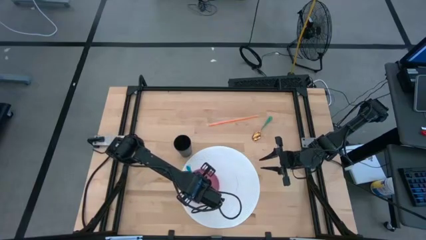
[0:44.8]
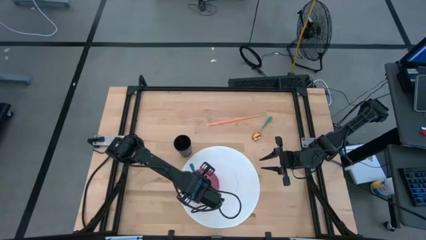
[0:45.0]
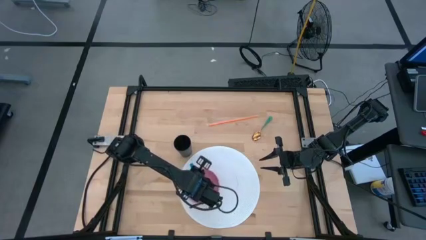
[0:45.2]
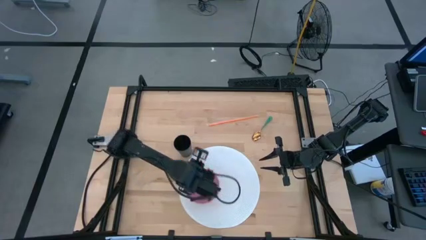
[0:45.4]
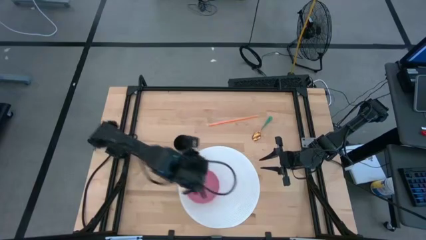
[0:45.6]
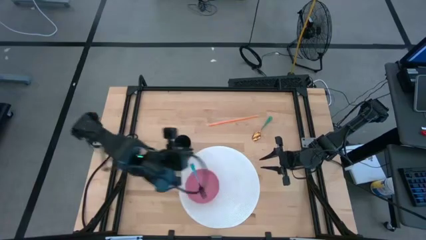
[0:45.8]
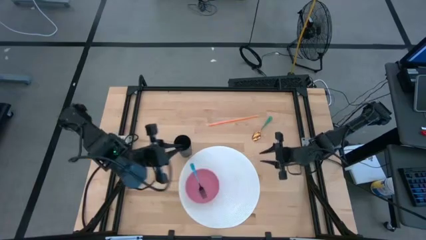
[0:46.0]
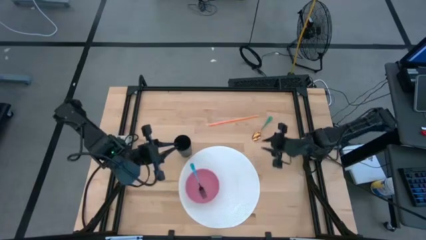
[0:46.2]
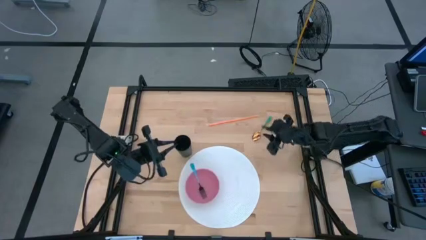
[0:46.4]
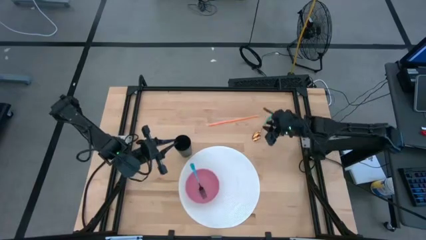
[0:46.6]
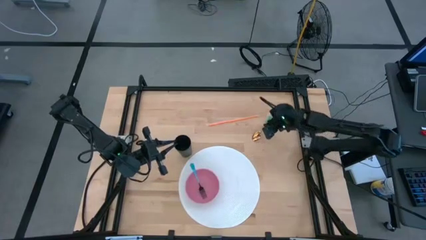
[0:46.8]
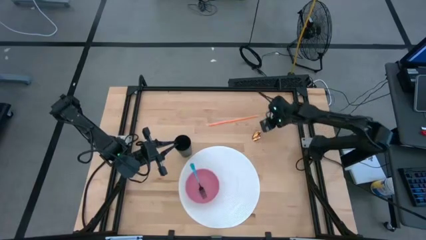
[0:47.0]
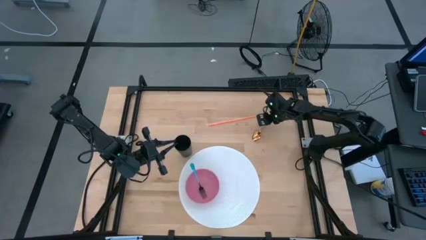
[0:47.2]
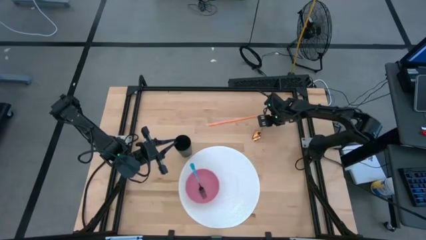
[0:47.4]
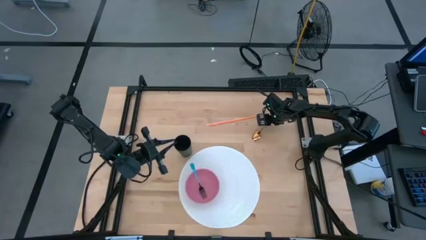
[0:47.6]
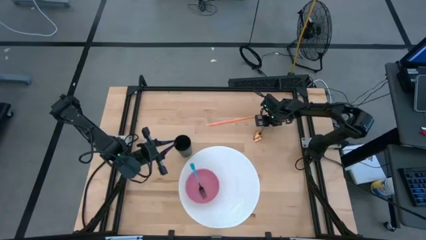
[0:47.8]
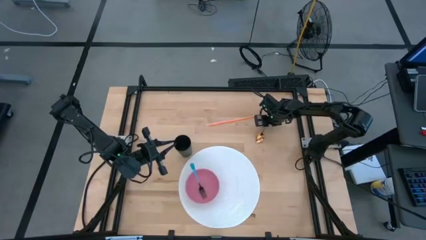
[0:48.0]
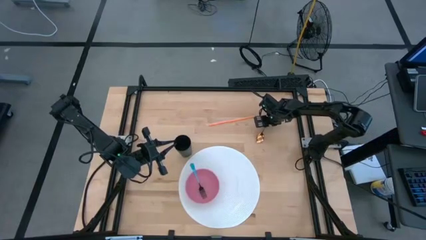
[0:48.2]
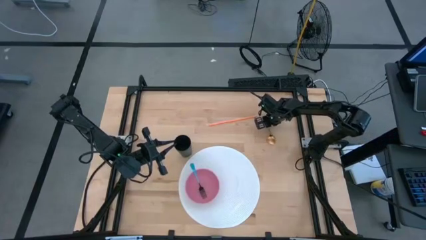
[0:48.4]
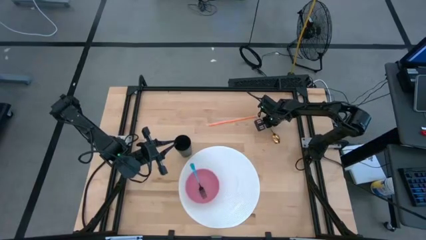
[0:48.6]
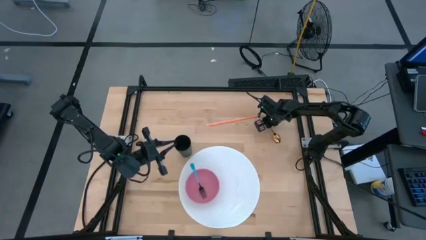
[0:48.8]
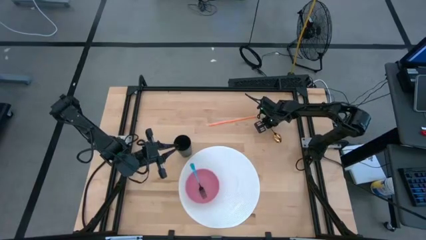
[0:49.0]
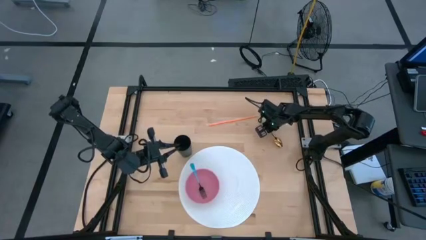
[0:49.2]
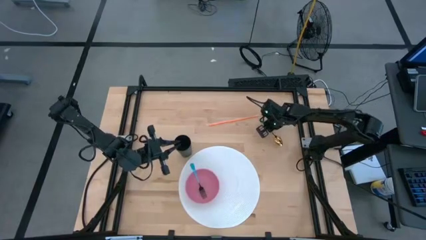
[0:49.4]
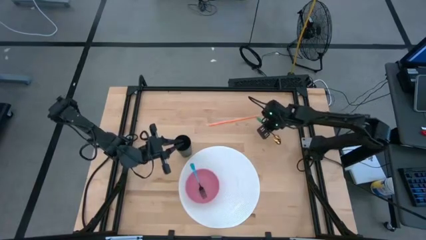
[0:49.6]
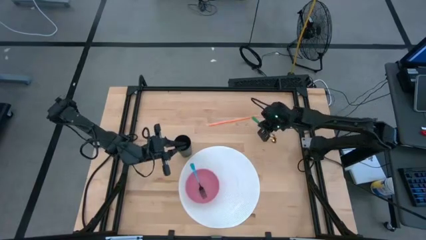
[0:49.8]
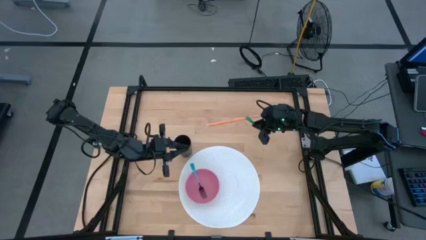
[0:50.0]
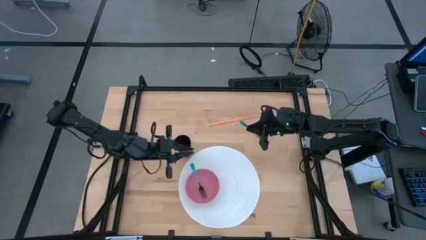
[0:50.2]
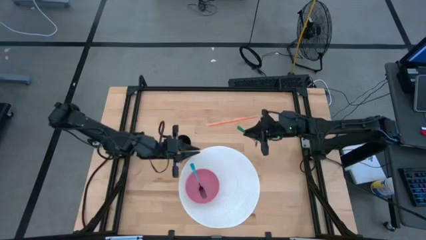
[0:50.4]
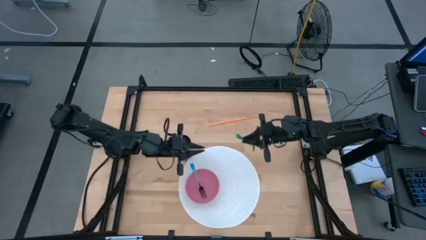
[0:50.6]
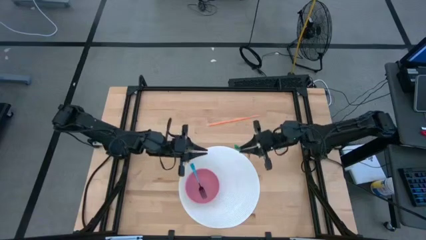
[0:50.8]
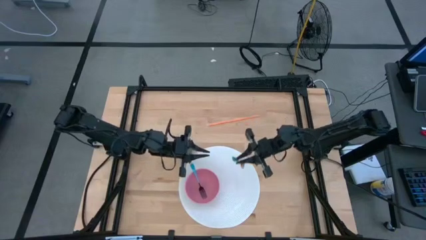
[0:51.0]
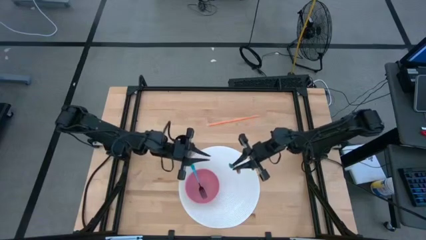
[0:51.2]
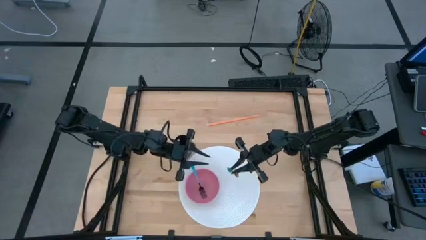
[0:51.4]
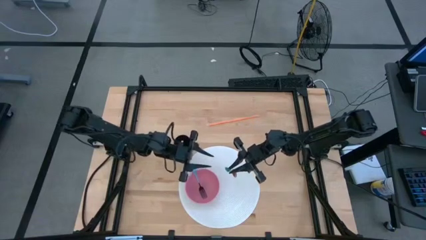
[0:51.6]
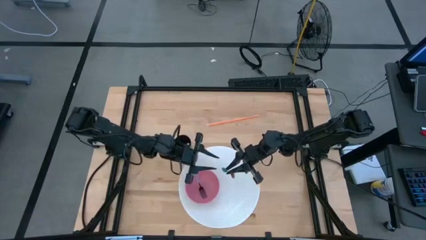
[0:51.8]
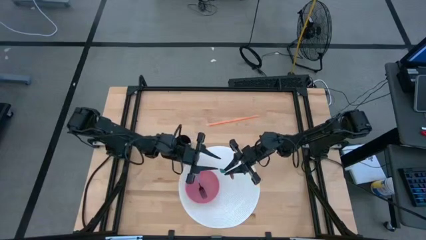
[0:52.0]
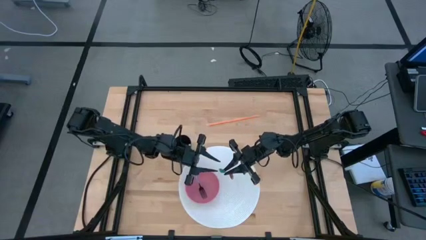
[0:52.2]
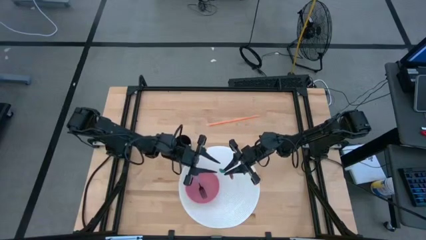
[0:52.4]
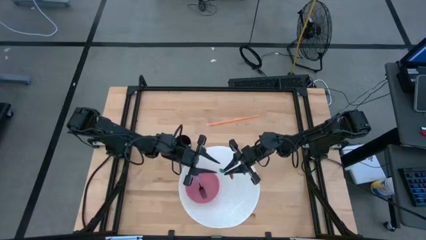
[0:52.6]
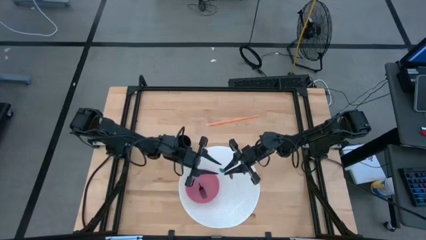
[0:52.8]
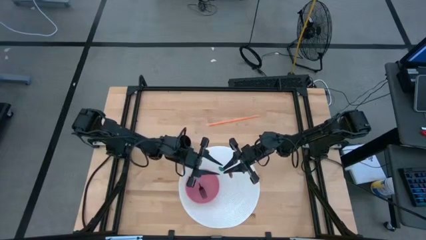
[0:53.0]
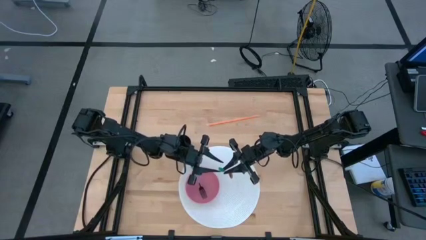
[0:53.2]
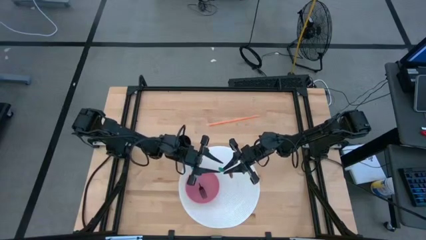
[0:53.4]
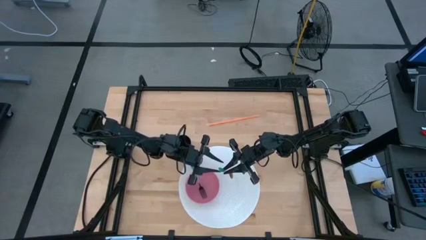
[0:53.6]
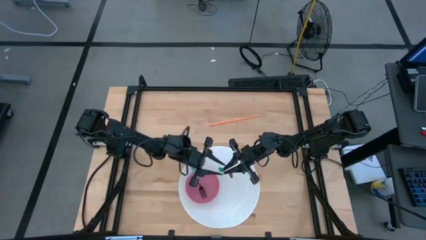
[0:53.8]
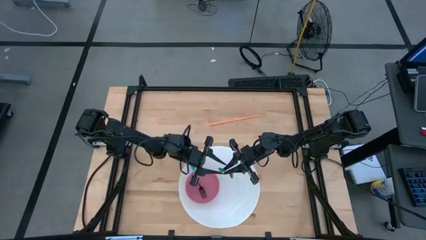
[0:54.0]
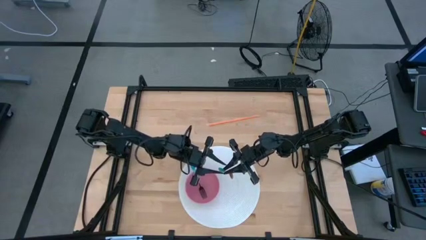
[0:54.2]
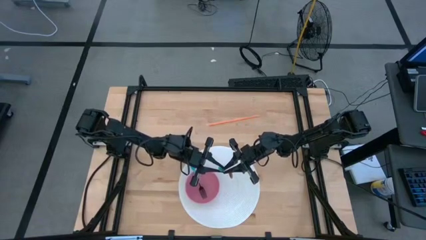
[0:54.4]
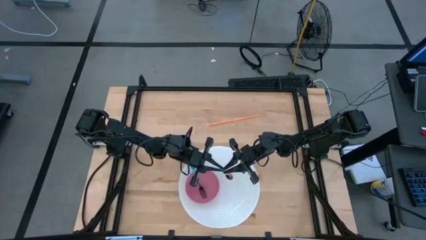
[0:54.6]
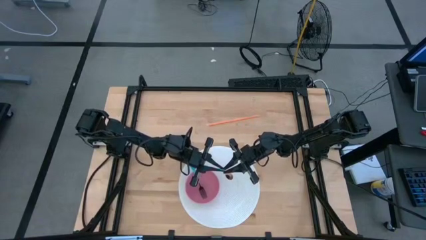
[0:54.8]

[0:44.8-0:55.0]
Task: Pick & Place Utensil
Put the green spoon in the pink bowl
